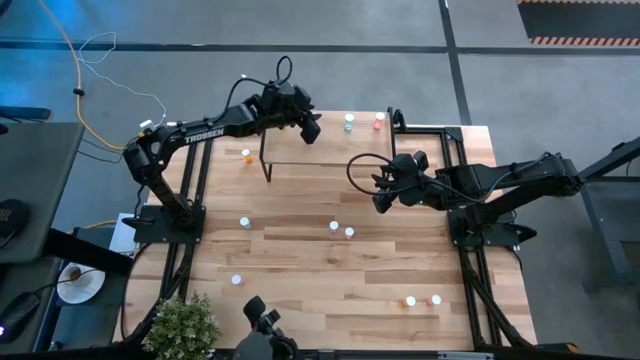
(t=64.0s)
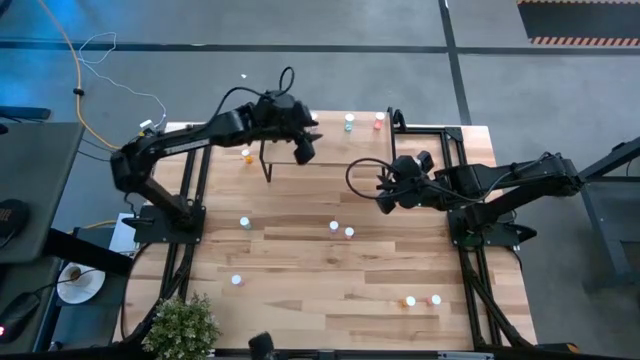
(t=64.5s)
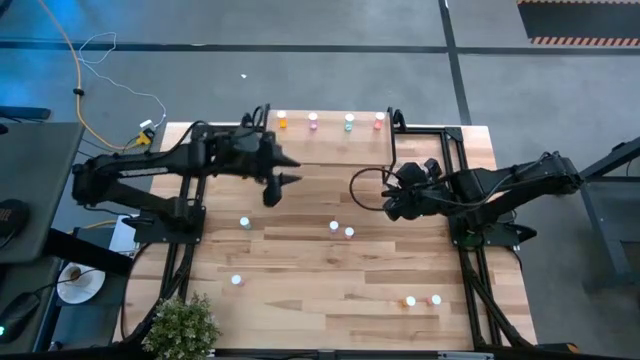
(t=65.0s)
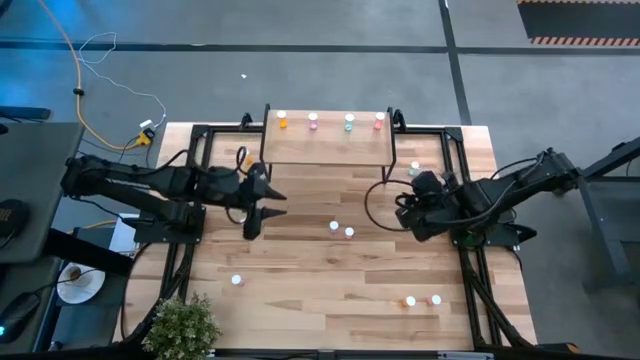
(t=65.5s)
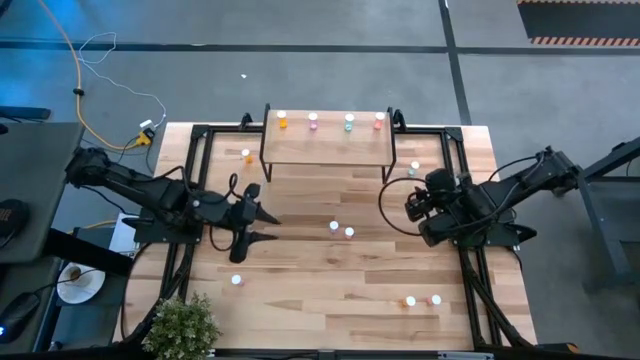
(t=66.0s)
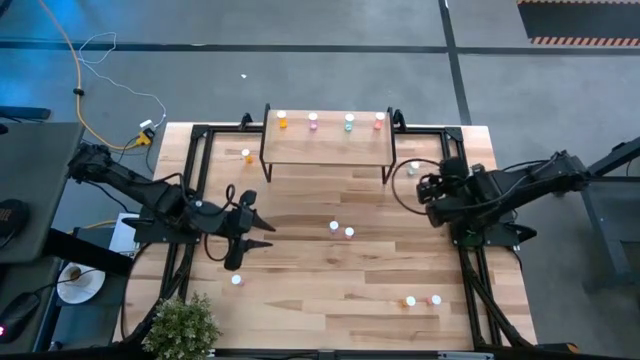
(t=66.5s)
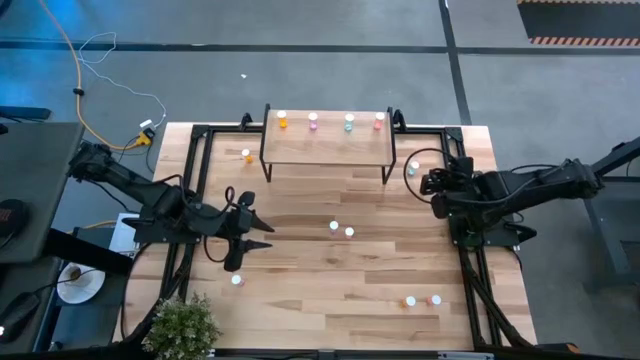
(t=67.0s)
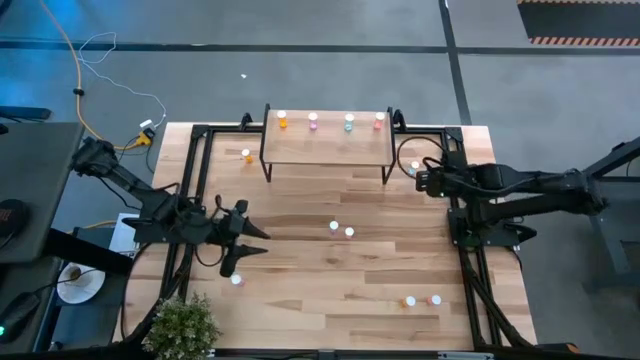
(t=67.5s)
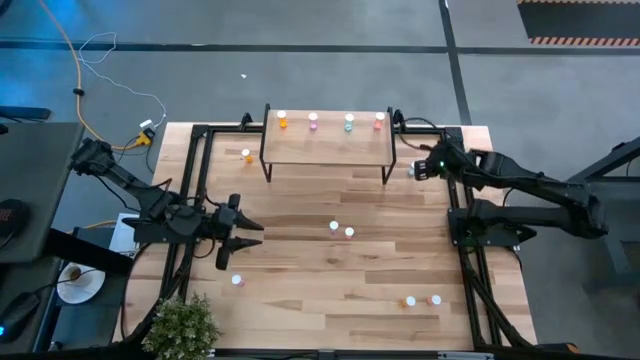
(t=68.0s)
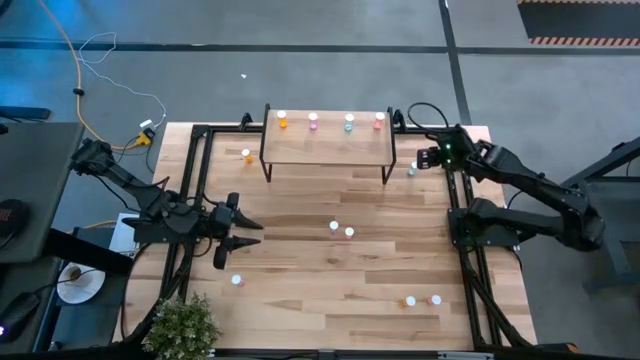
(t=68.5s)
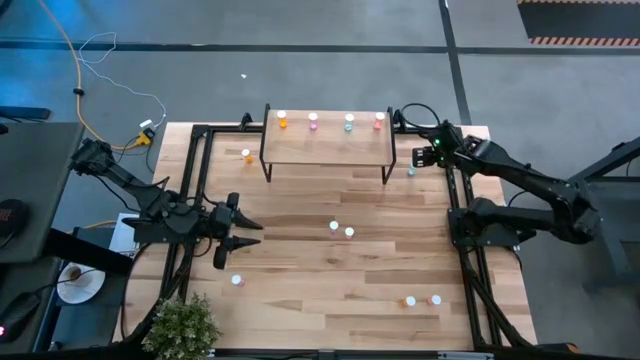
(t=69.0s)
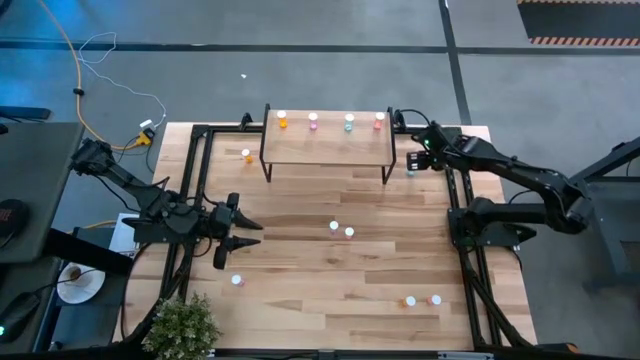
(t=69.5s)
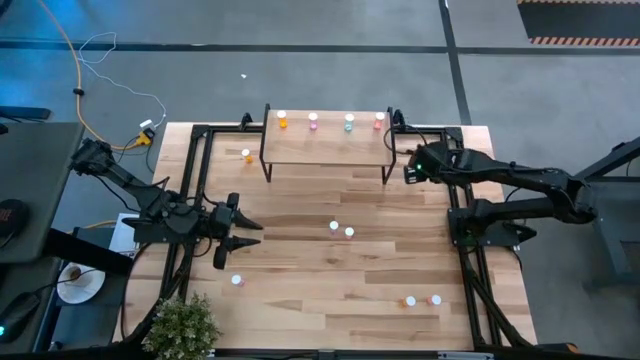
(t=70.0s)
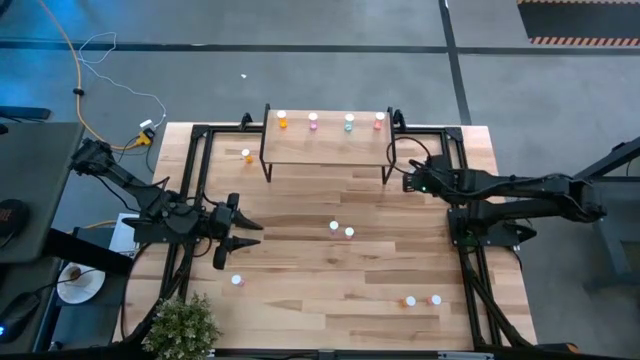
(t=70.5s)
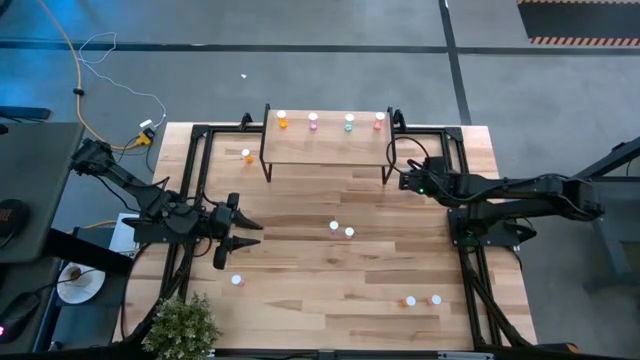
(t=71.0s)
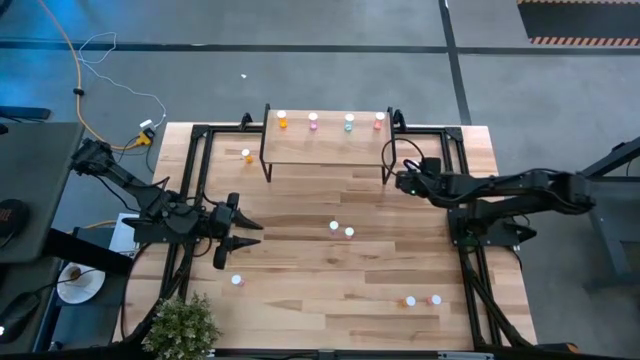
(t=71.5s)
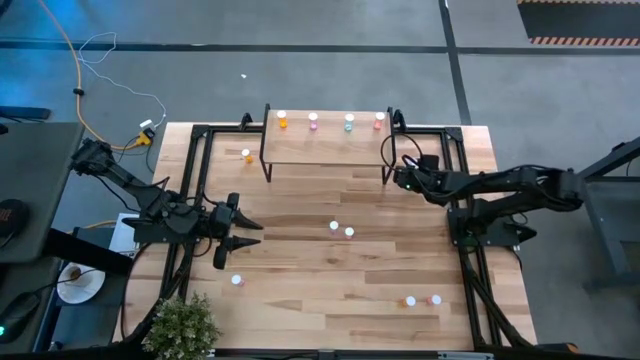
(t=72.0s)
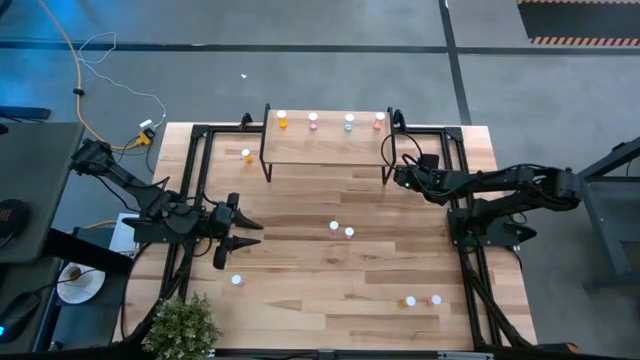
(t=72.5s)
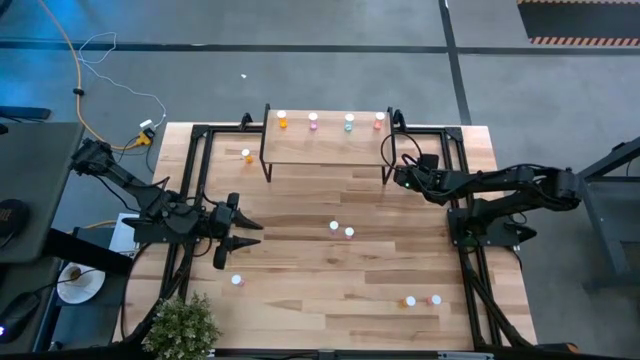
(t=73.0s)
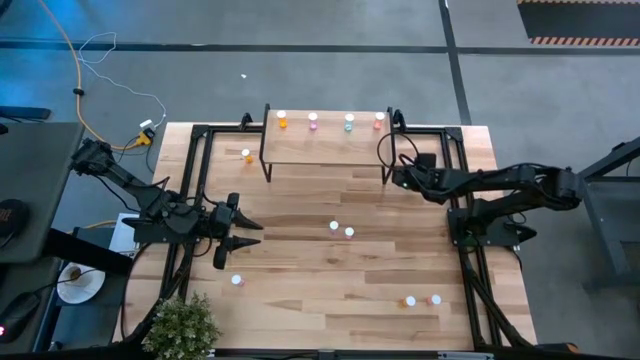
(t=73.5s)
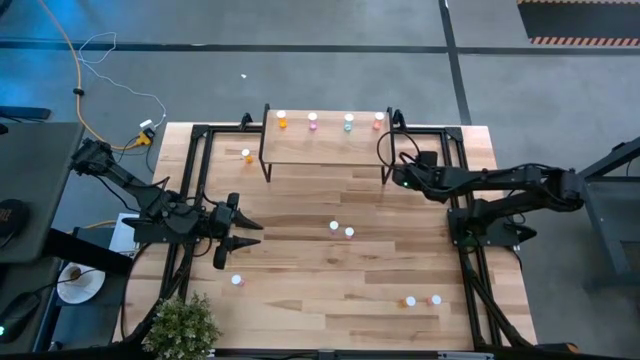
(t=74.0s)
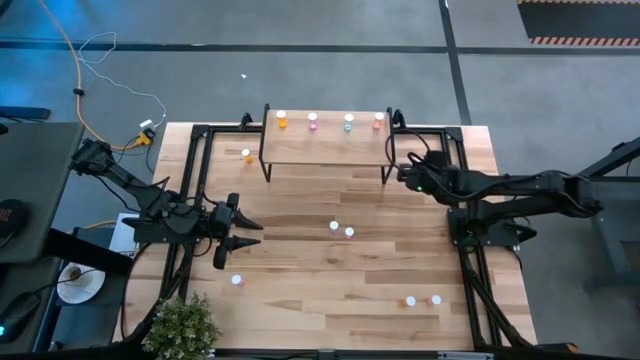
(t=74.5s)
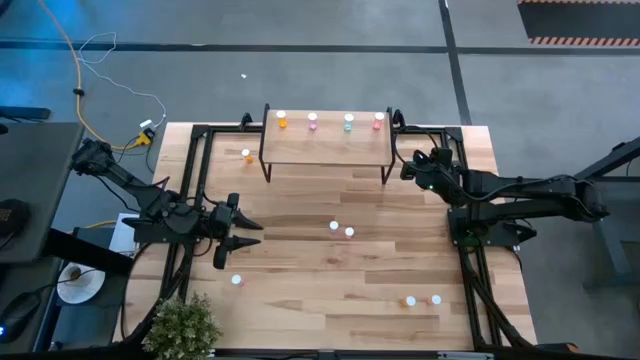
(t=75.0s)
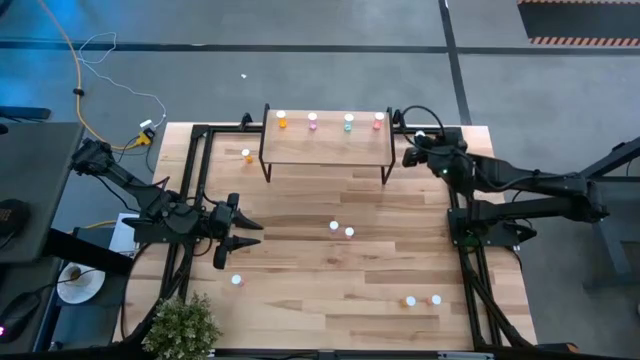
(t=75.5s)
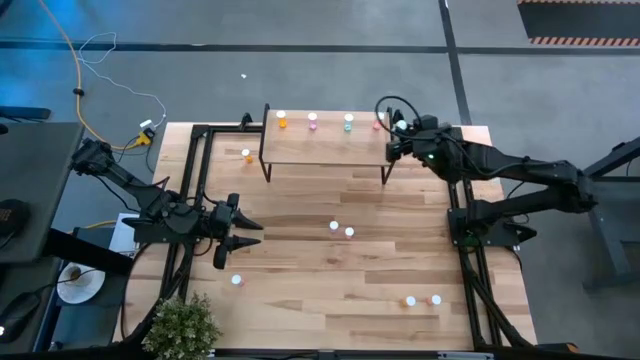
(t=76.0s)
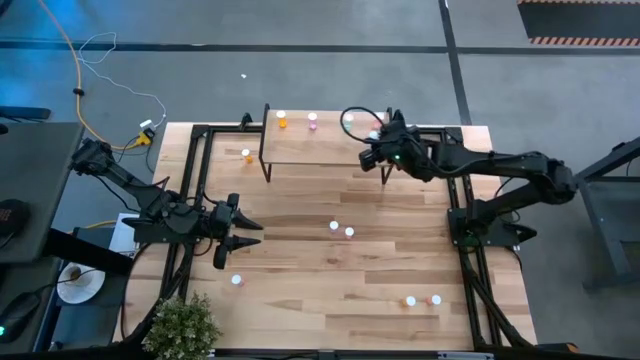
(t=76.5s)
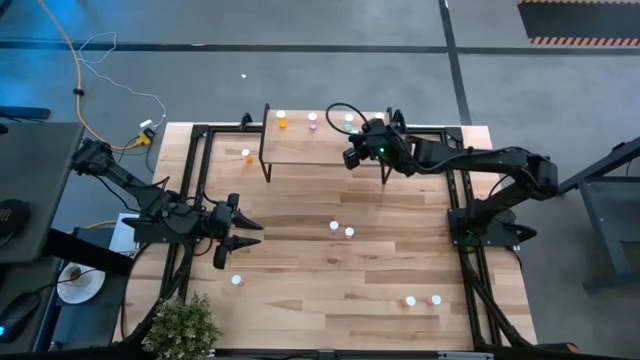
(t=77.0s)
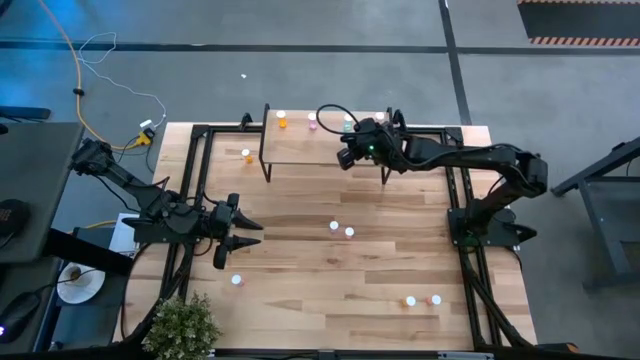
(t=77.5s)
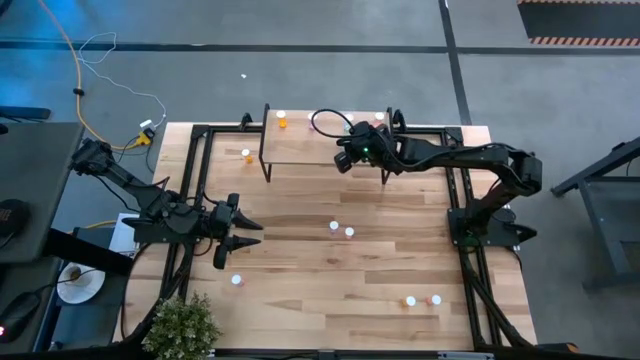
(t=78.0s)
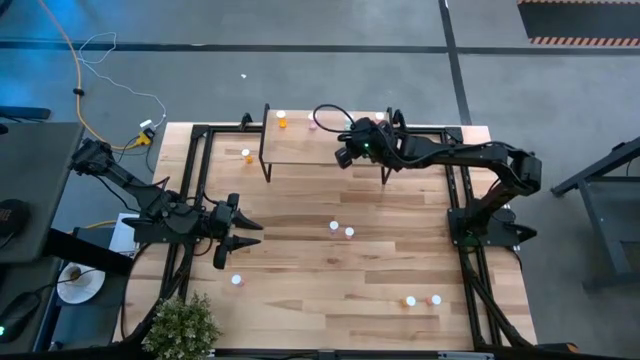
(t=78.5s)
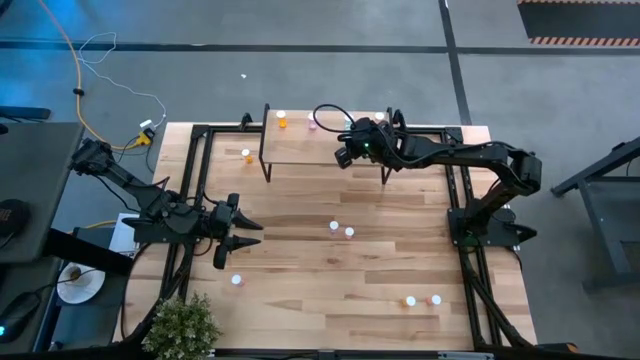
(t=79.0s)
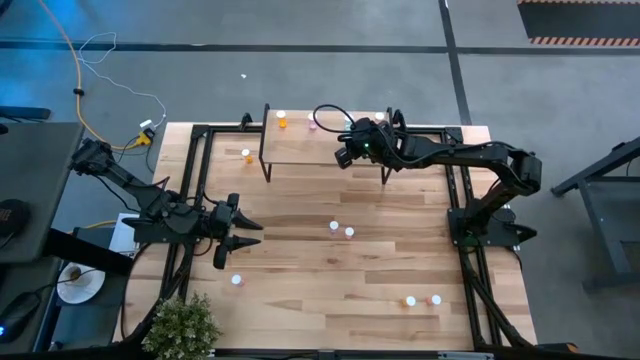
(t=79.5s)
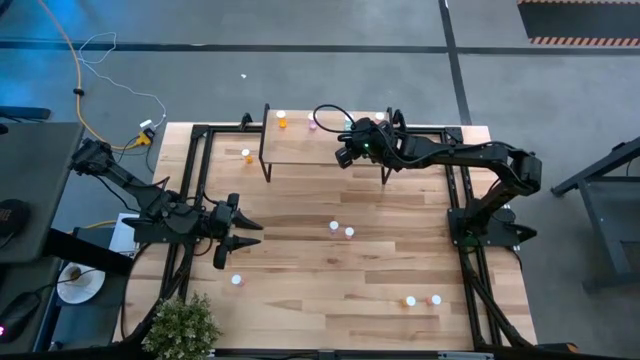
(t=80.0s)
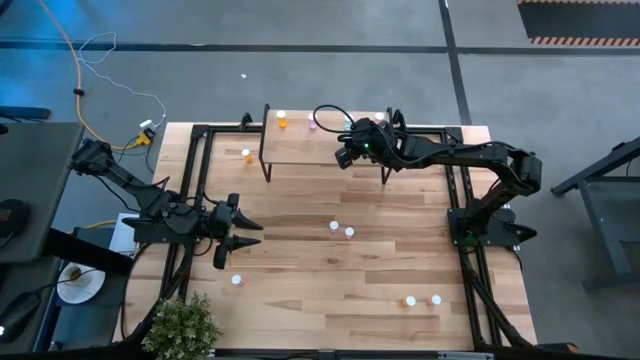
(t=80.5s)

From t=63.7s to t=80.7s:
Task: Pick and place medicine bottles onto shelf by color
Put the top green pill bottle on the shelf aligned with the other green pill bottle

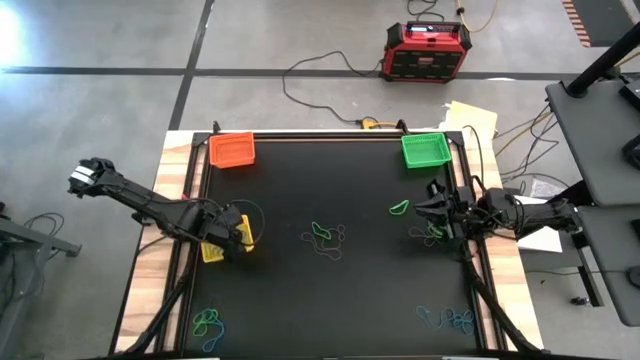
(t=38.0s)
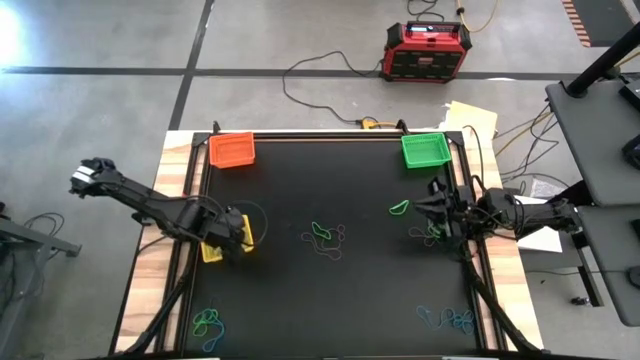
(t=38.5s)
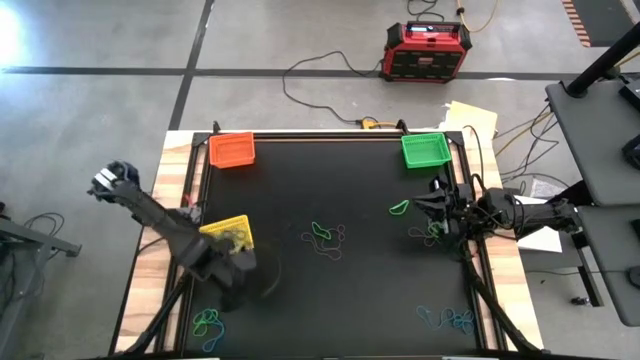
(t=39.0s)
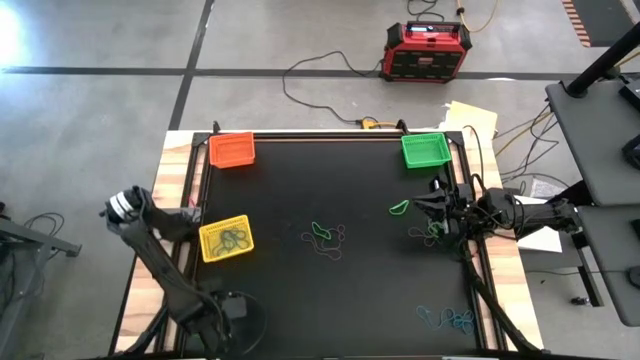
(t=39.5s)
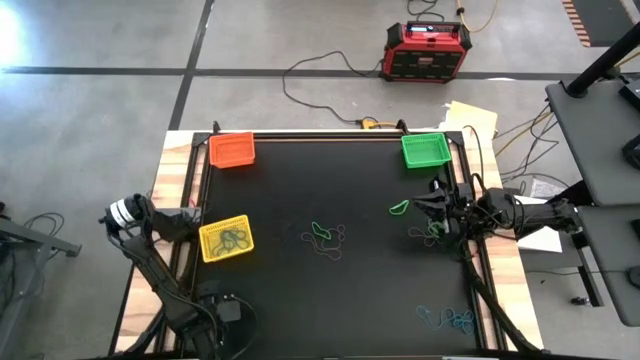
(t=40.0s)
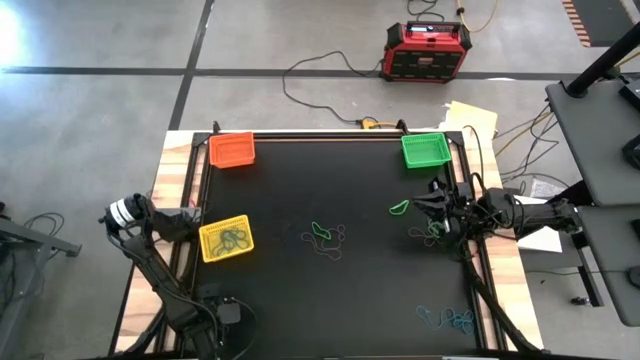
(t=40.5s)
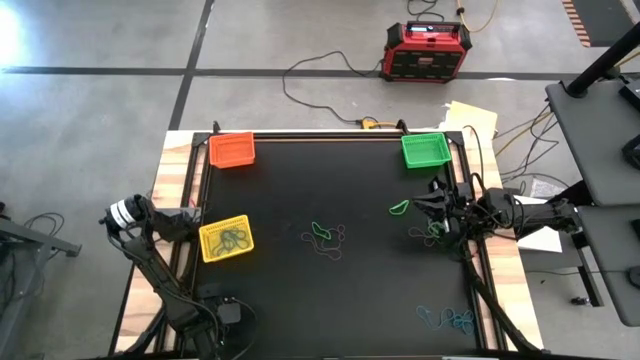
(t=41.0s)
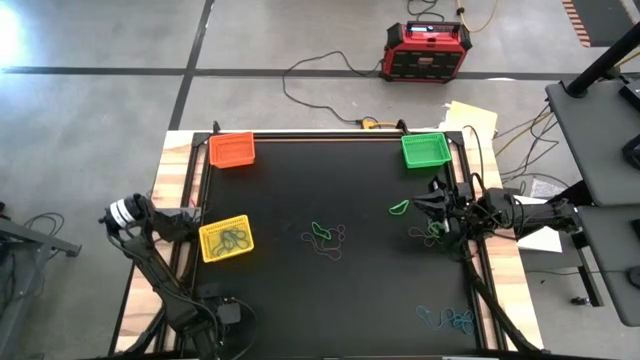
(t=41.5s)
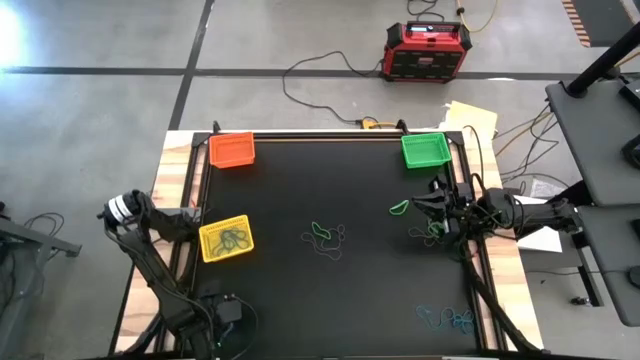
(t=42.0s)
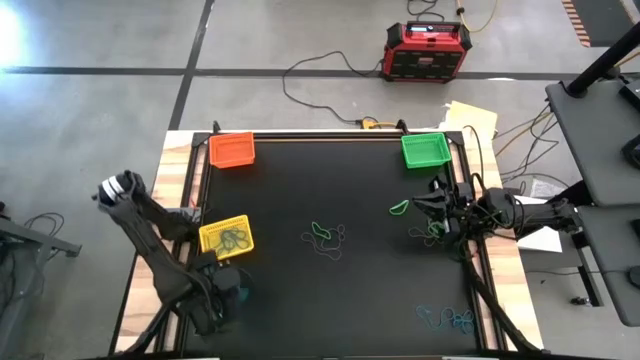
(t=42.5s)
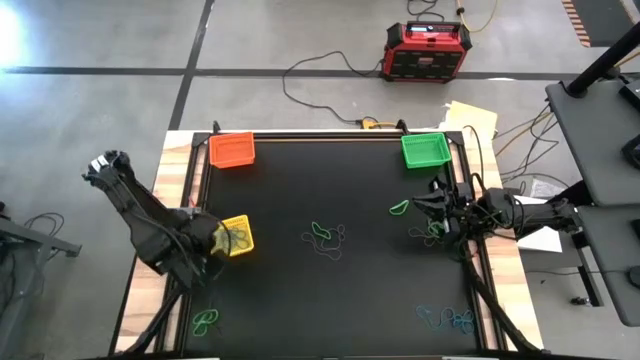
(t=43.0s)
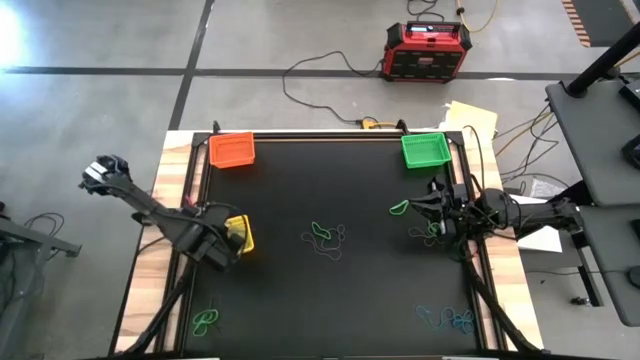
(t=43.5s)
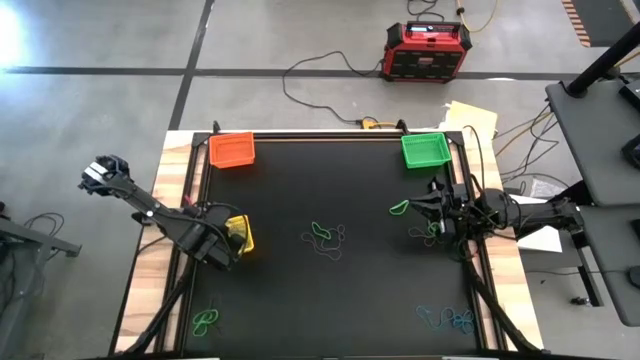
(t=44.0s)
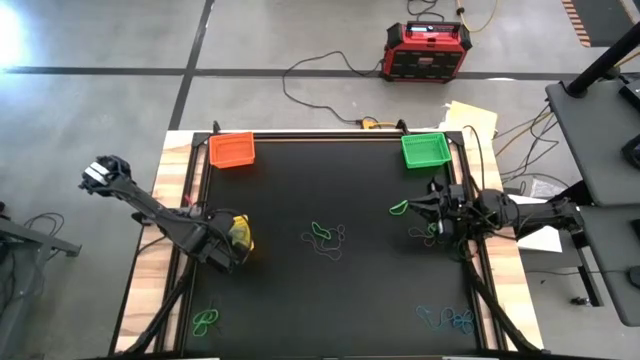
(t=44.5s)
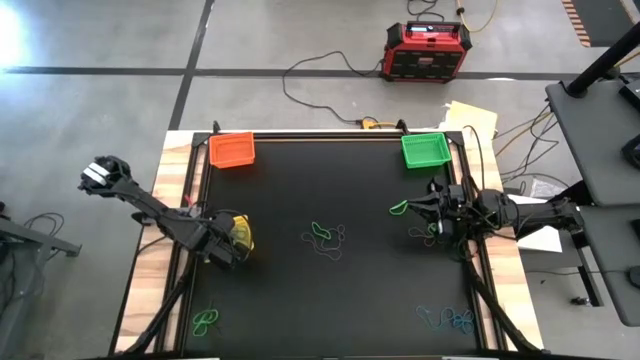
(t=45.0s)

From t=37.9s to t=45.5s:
Task: Sort rubber bands into baskets
Put the blue rubber band into the yellow bin
